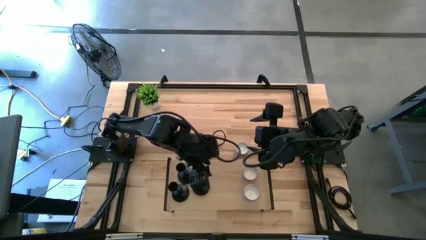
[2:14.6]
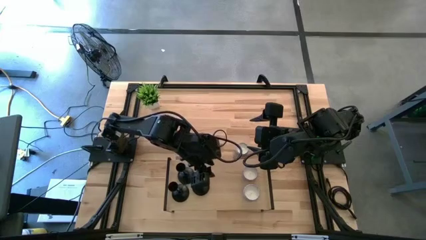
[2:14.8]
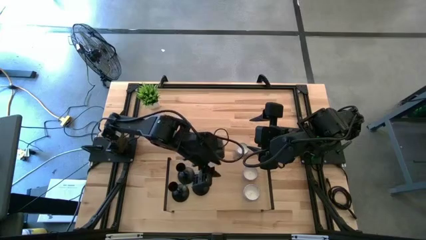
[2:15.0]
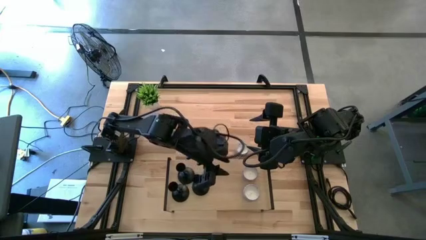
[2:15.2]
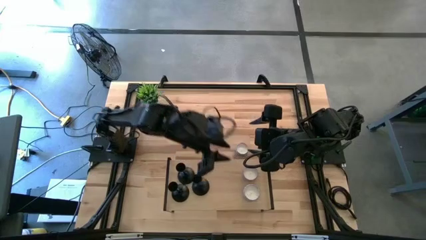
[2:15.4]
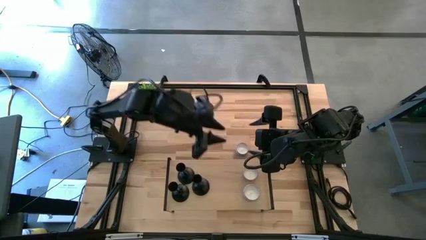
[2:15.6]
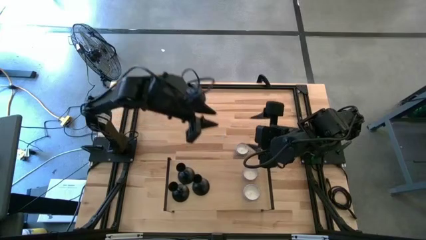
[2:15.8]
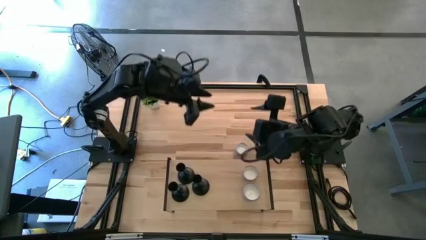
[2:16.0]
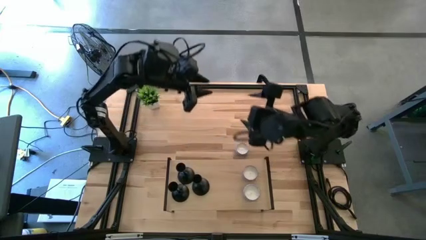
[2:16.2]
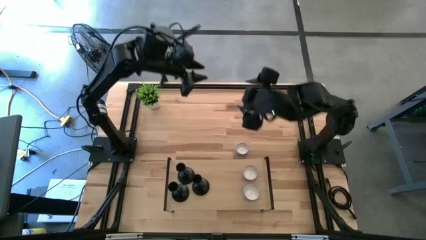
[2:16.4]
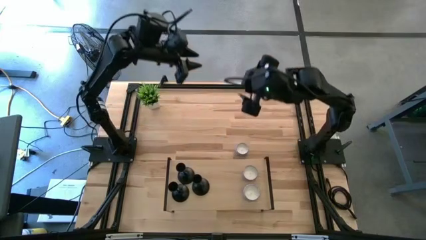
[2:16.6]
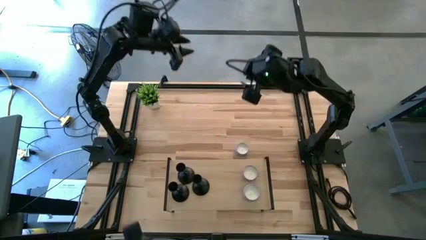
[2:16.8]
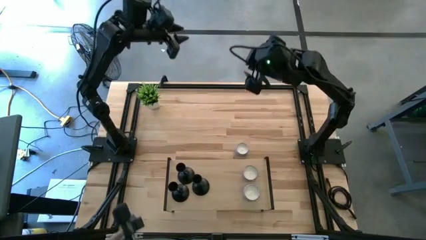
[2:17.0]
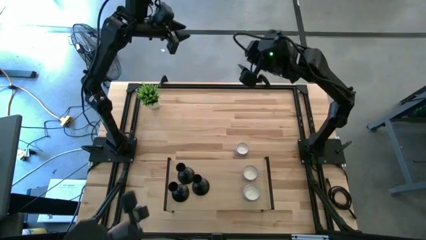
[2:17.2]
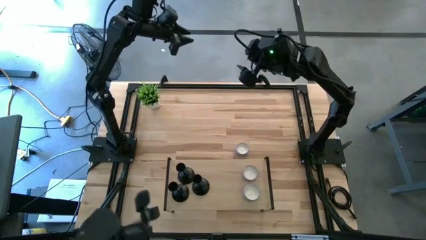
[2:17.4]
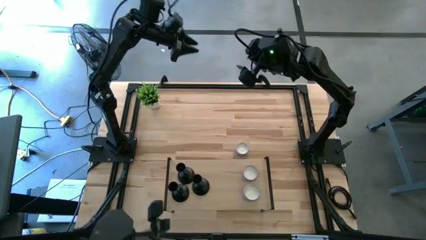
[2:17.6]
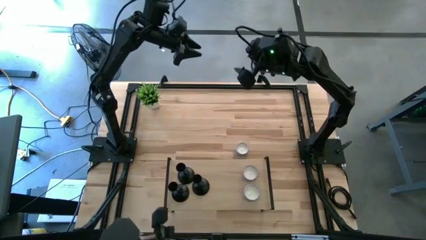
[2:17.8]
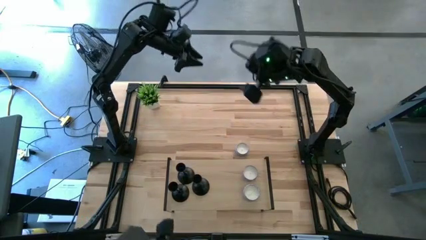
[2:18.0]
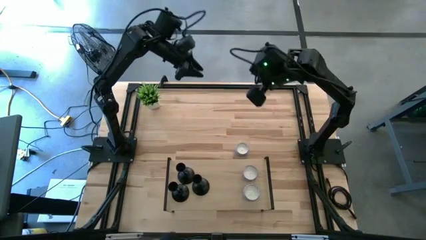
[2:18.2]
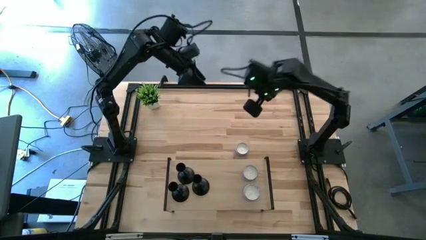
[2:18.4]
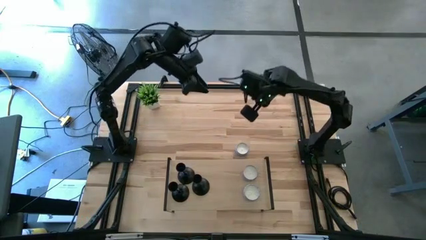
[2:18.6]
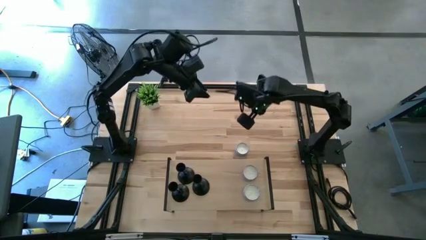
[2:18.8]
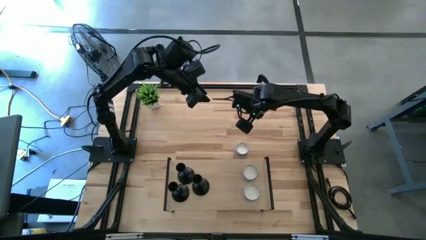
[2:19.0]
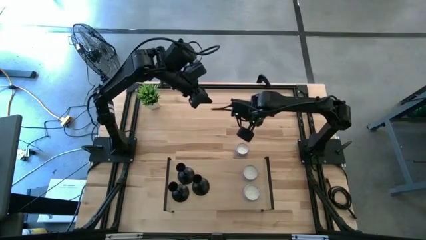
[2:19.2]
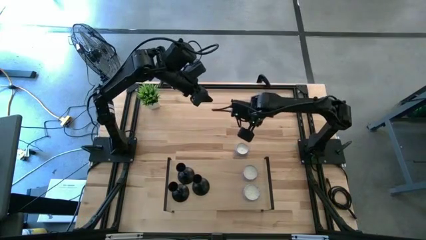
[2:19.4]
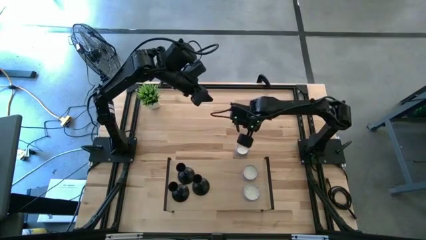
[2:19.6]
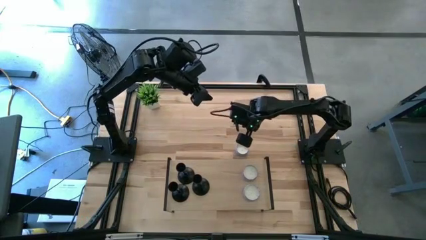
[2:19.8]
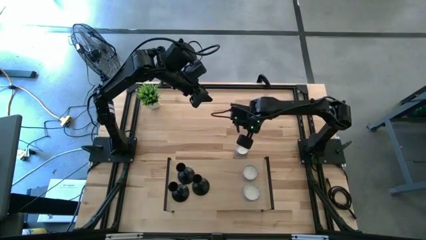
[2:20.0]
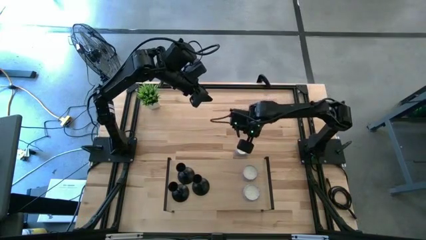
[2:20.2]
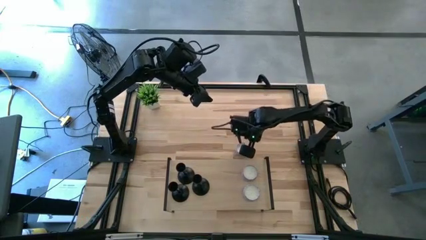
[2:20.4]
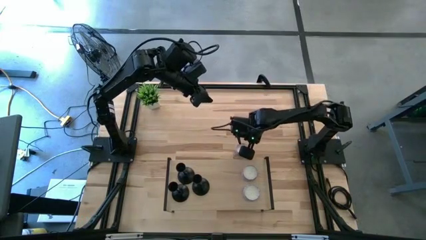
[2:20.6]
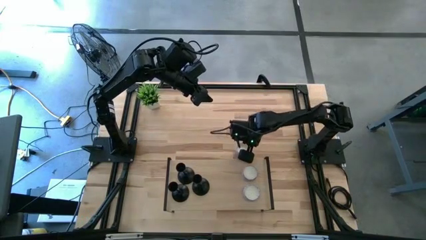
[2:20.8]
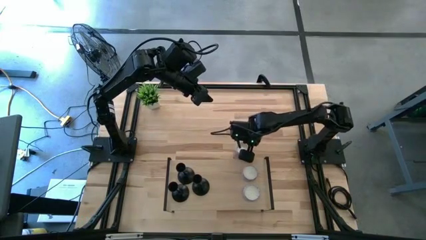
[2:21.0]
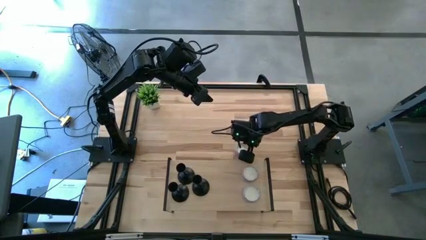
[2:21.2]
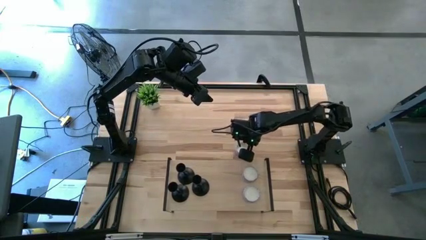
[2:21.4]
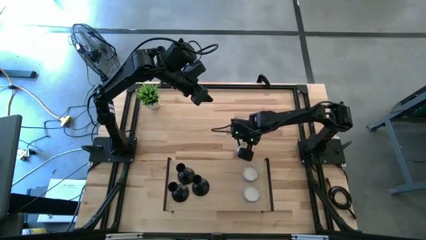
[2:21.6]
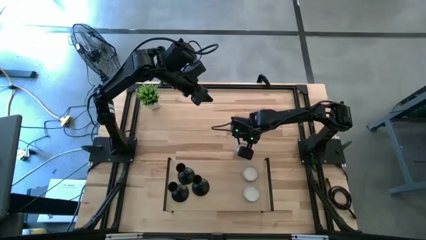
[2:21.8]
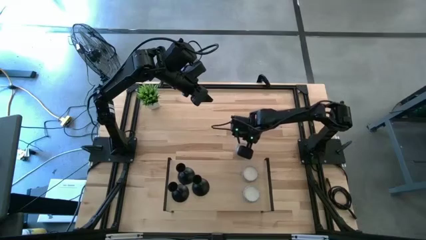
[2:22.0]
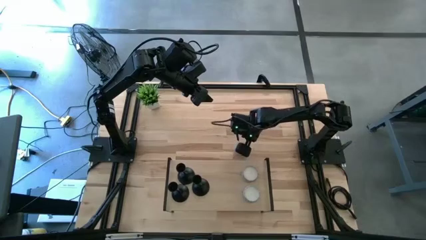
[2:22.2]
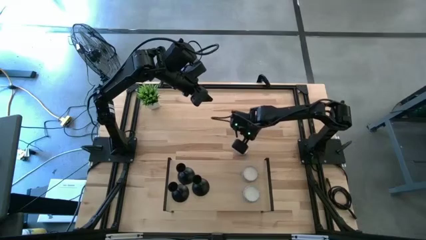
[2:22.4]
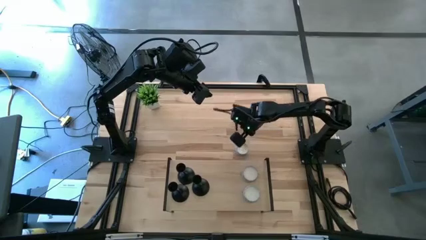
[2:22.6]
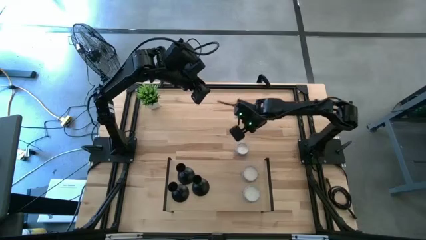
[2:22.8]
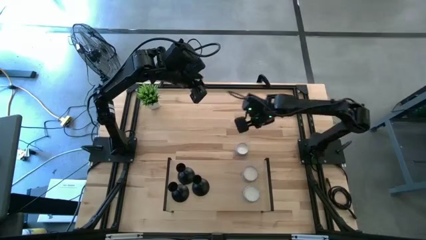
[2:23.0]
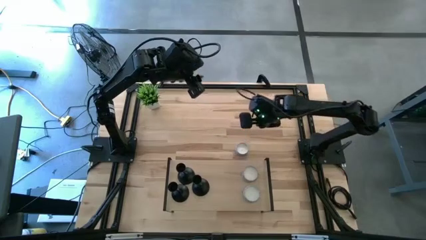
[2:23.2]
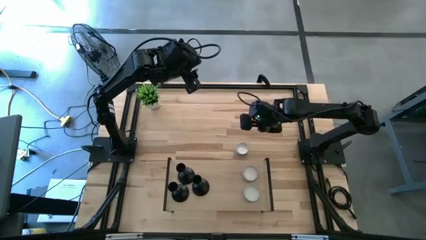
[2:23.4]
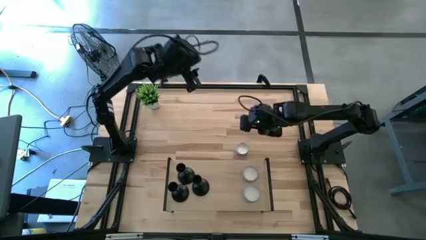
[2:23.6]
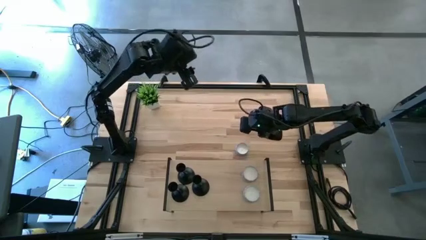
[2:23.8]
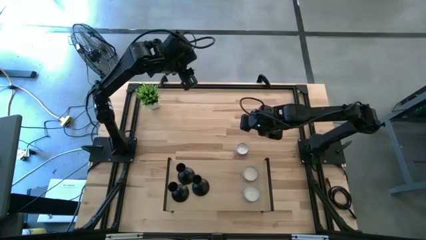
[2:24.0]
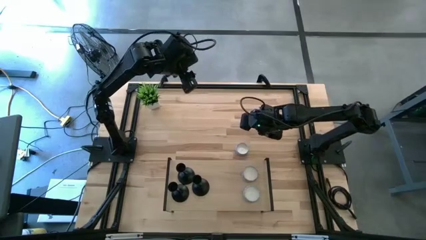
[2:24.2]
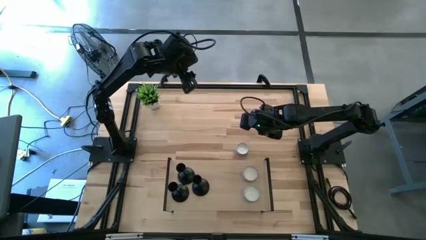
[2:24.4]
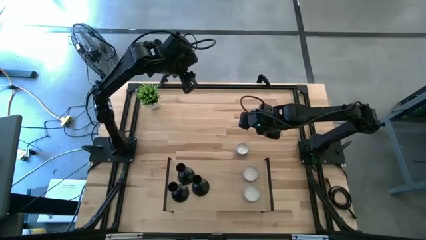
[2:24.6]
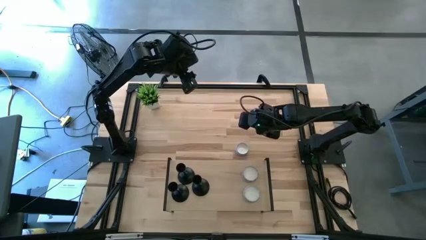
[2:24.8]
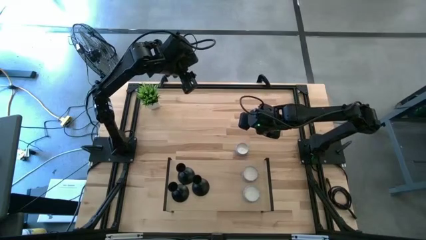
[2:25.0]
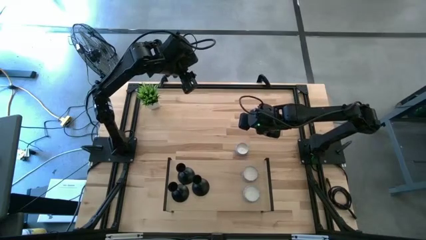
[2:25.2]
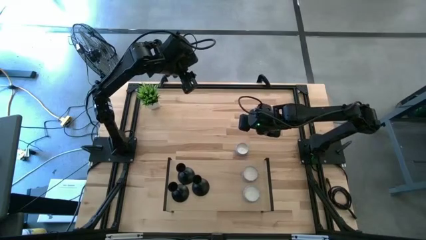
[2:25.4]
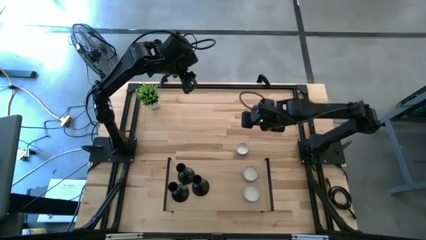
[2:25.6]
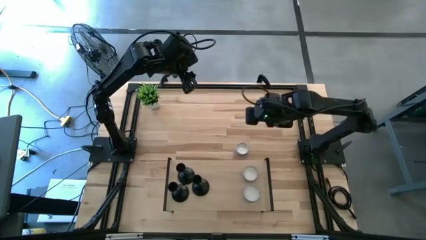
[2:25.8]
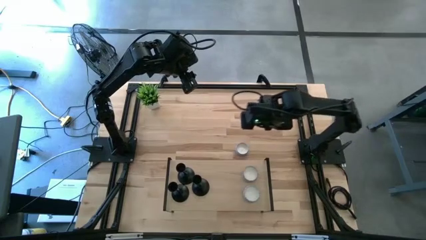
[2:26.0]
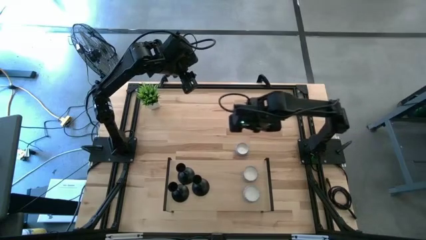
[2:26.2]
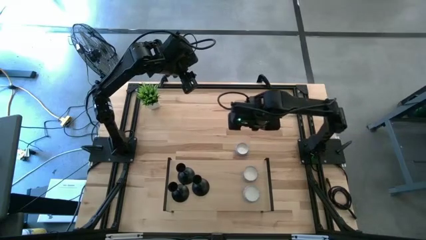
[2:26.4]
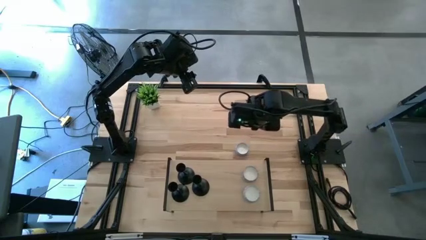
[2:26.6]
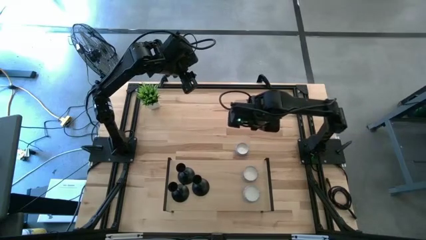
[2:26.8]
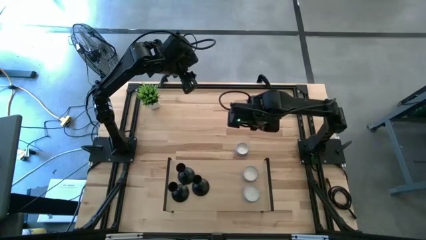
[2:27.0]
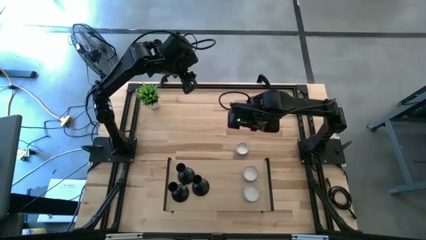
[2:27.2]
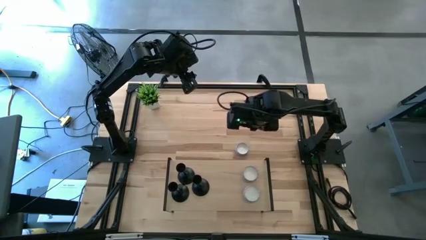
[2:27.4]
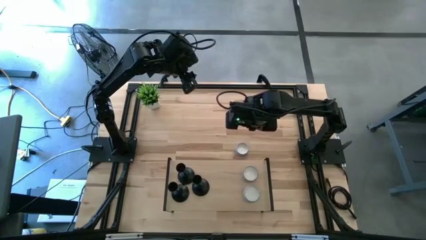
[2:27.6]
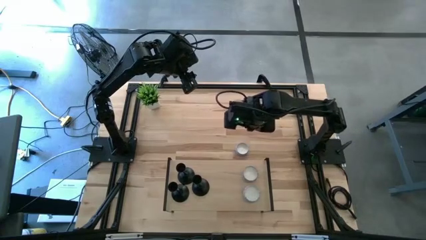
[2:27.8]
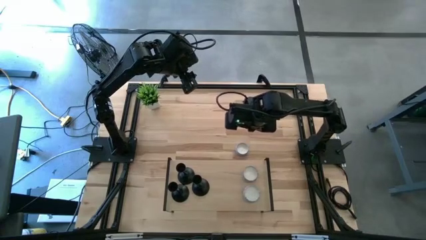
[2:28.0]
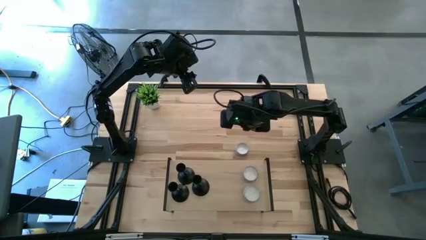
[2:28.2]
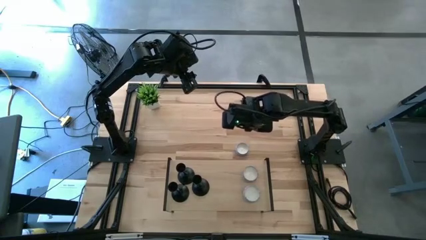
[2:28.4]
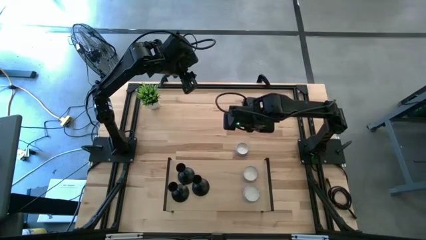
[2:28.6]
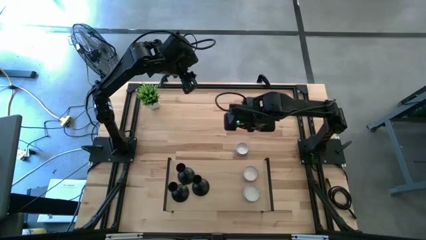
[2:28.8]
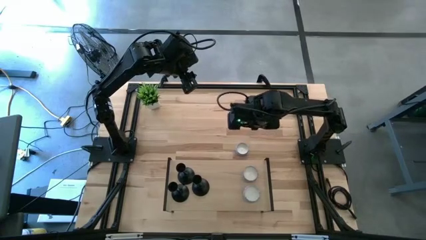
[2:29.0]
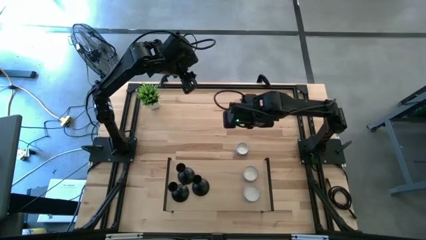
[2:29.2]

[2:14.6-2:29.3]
Task: Pick & Place candle stick holders
Put the blue scented candle on the shelf
